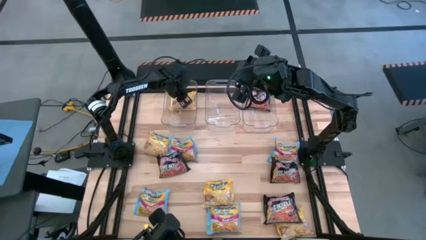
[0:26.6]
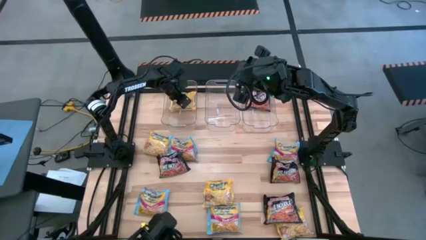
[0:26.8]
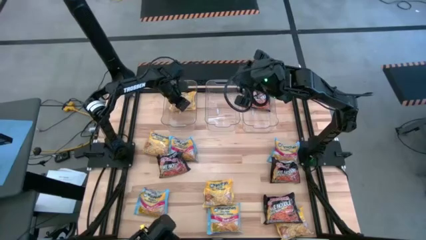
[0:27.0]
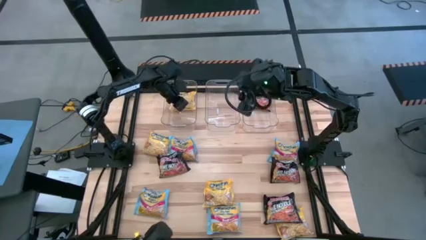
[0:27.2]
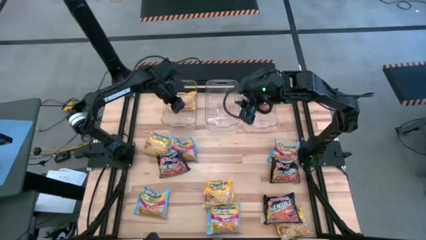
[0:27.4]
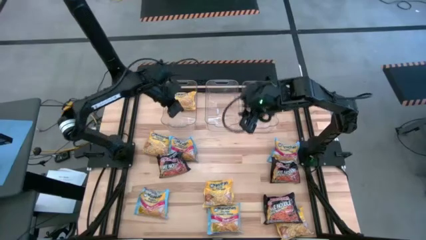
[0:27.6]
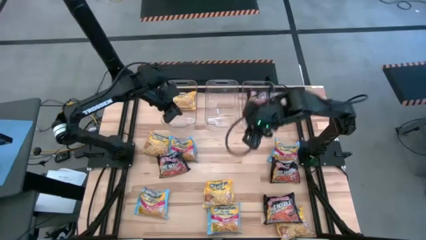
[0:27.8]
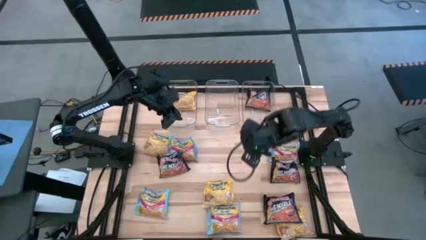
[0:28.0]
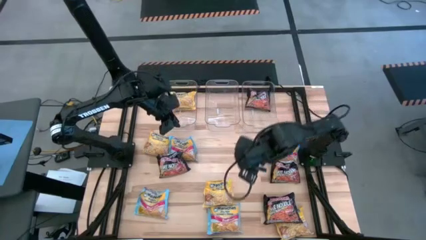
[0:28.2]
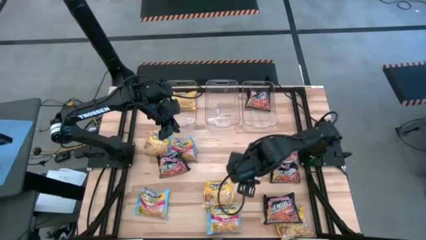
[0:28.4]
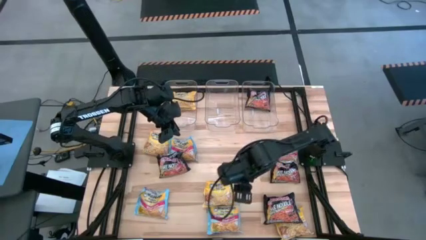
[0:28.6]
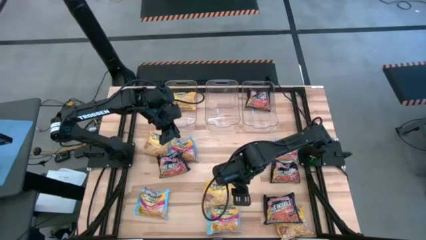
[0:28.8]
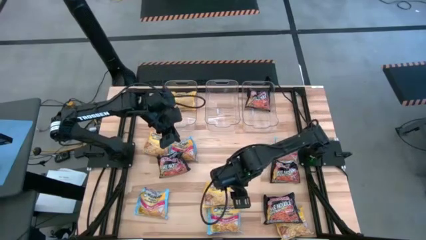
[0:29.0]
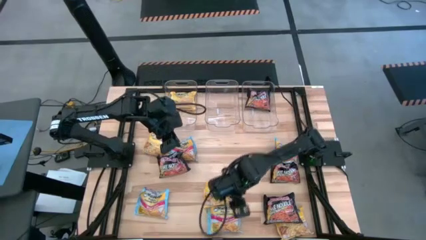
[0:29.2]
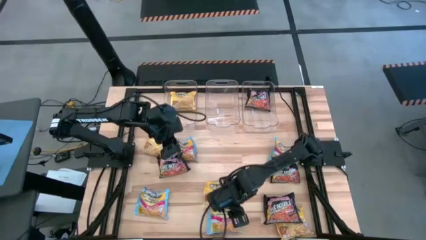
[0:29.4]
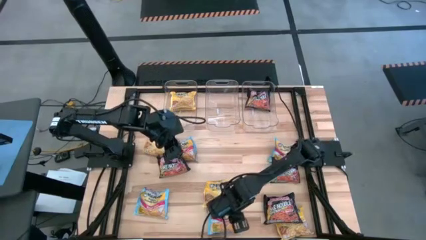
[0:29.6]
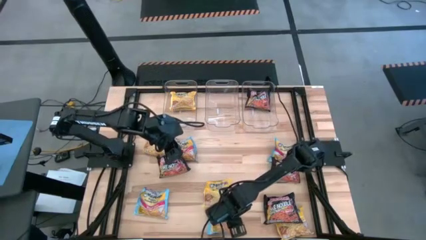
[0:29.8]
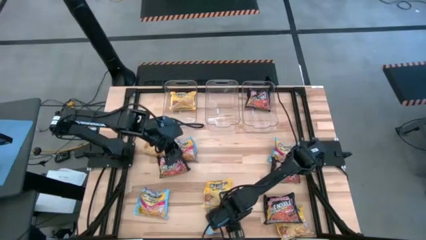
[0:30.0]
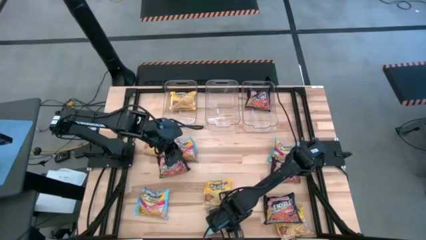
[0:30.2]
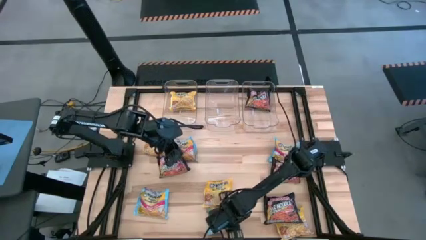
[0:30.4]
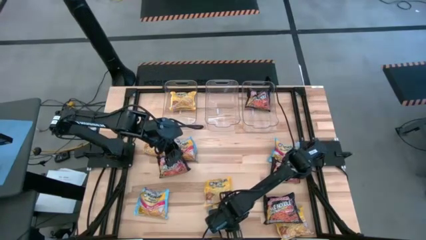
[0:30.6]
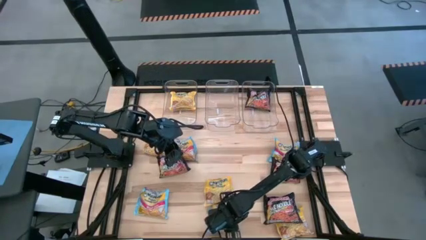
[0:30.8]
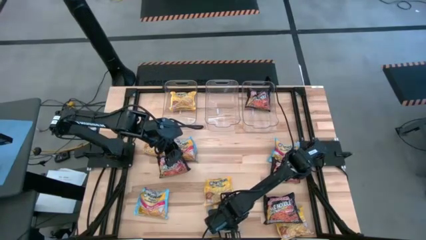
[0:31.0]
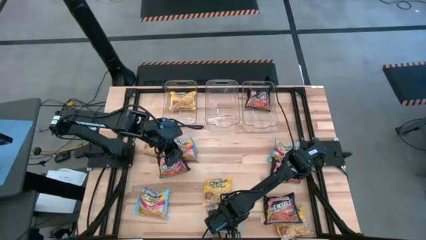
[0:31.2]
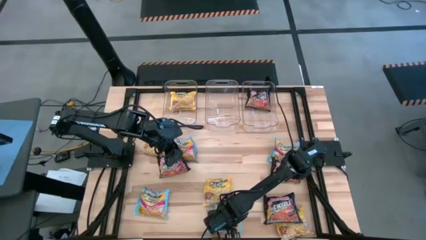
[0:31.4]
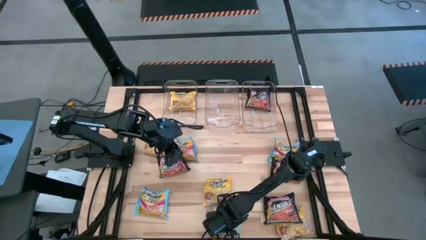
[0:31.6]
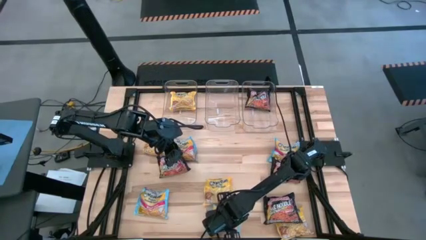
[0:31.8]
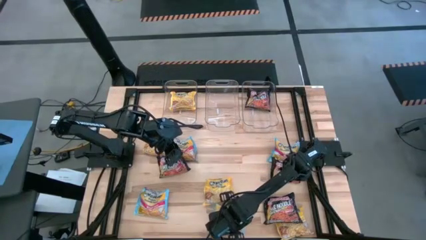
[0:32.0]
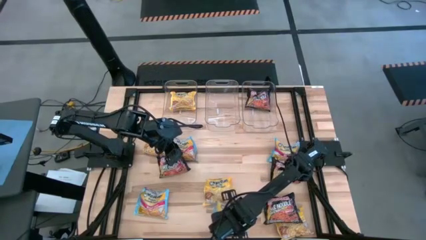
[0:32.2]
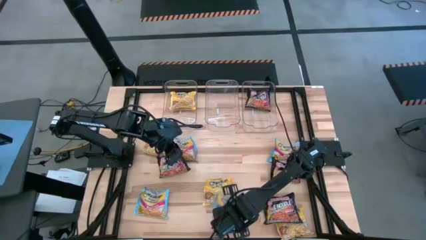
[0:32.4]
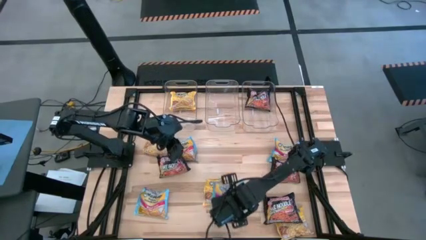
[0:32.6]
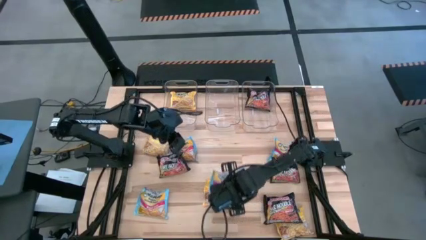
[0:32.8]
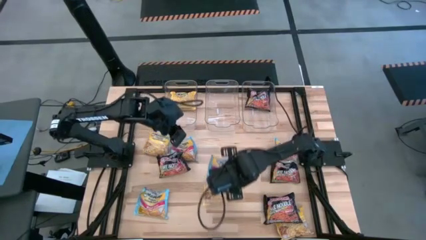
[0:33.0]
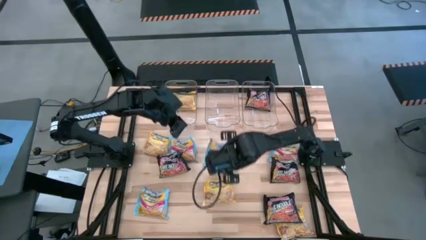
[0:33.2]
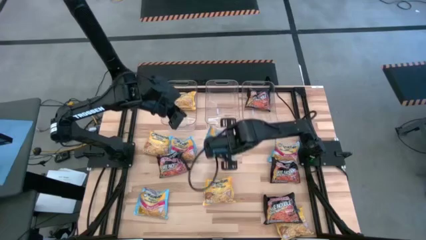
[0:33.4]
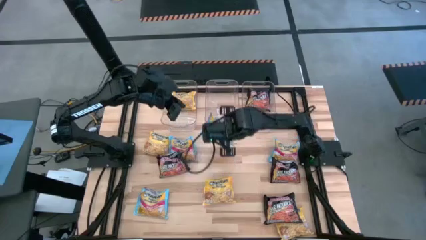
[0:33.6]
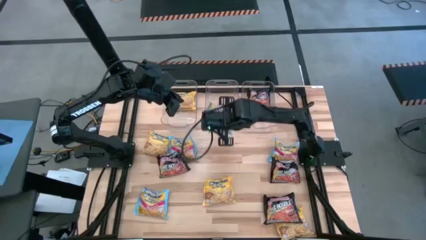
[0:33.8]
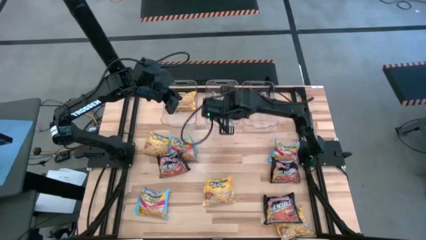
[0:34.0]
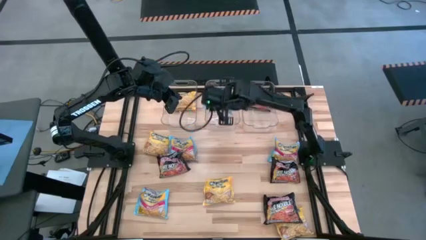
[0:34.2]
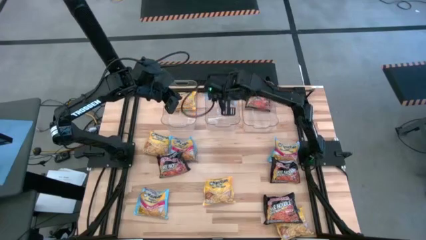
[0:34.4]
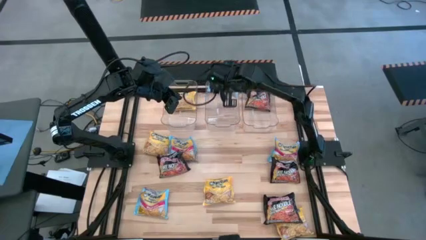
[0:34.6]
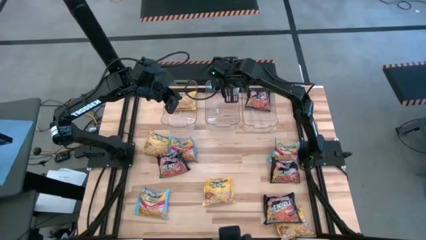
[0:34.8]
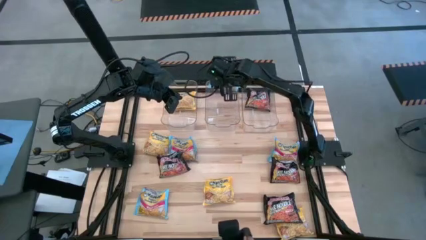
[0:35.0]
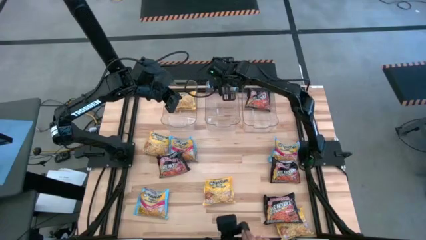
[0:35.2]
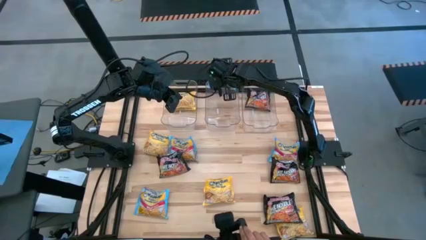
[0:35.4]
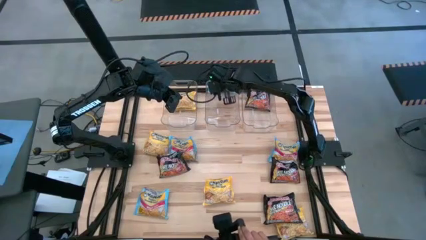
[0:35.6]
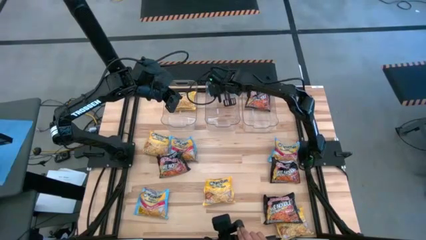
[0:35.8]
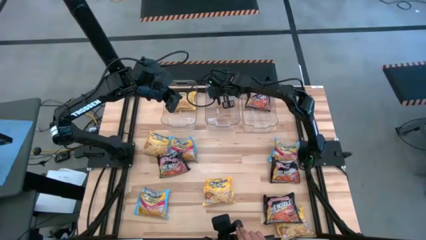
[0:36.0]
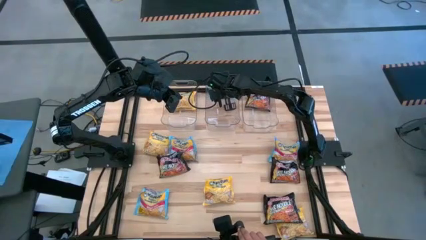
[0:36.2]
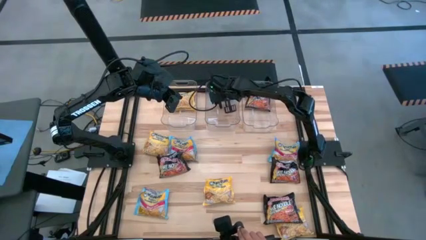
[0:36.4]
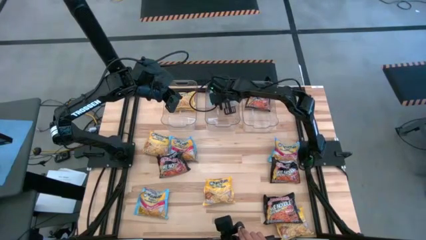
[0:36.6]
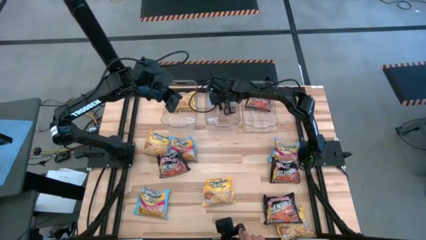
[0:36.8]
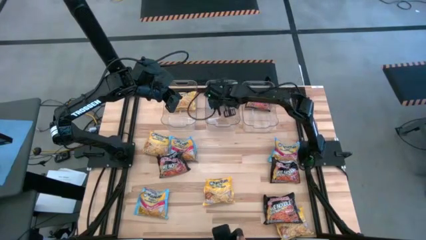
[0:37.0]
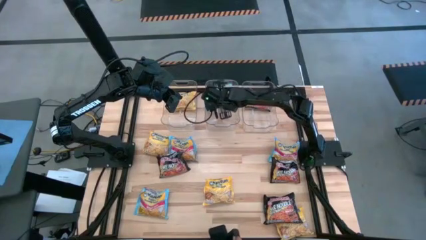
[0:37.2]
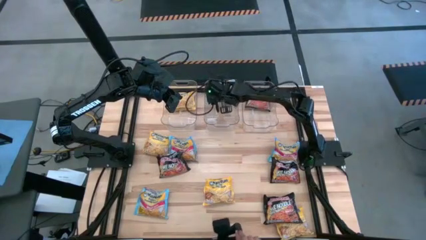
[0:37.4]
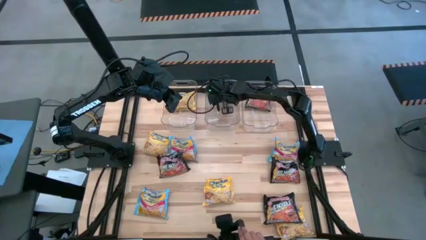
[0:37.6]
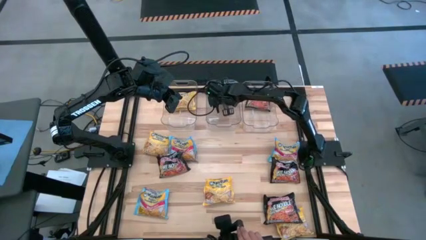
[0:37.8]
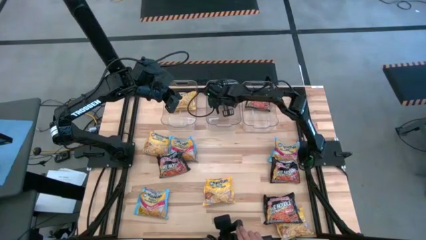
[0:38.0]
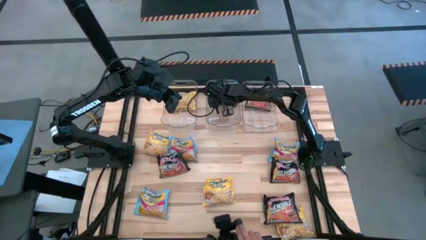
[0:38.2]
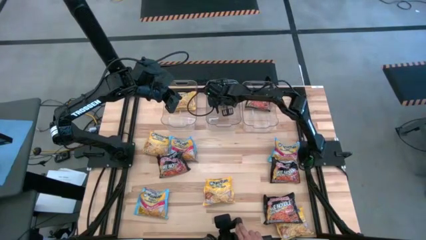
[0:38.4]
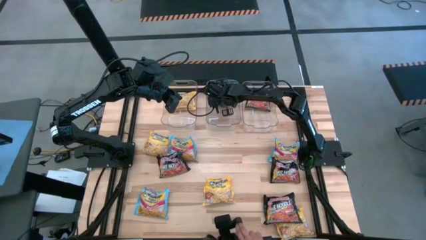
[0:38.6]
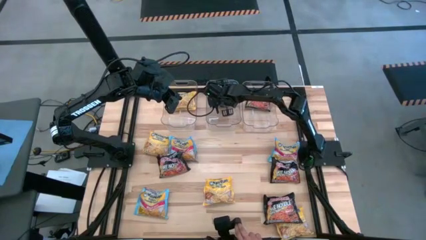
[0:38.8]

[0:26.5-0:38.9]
Task: Sort Maruchan noodles
Put the blue noodle pack into the center transparent bin
